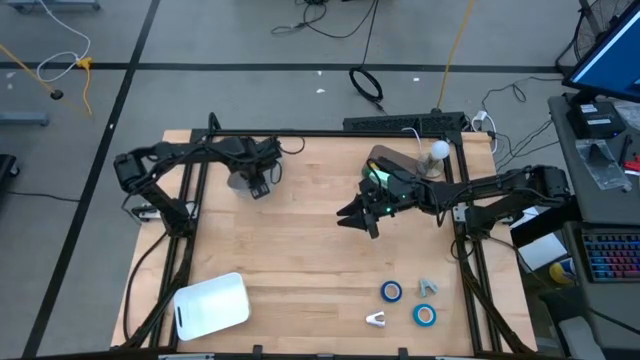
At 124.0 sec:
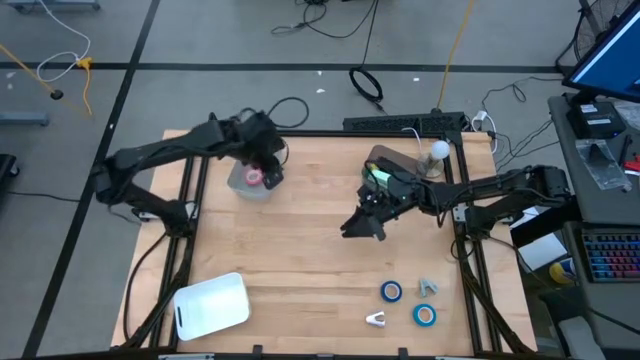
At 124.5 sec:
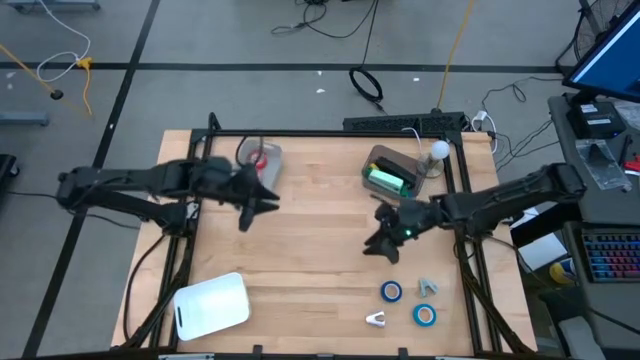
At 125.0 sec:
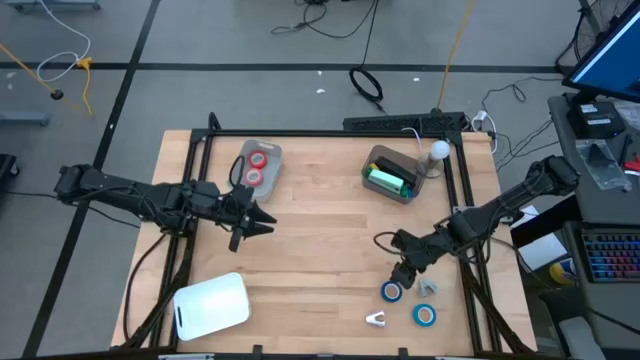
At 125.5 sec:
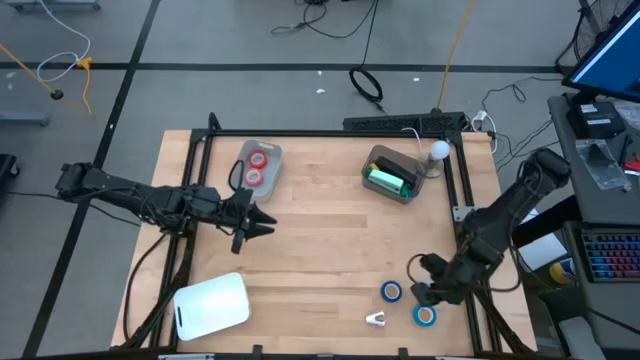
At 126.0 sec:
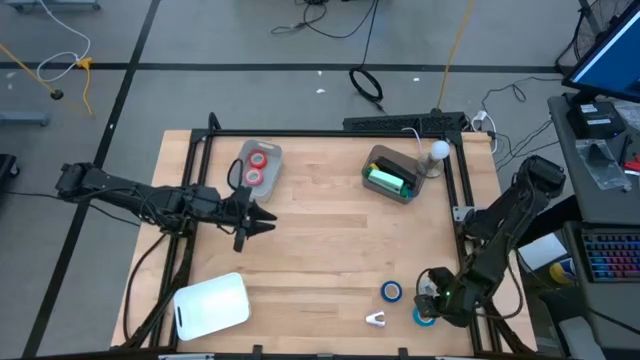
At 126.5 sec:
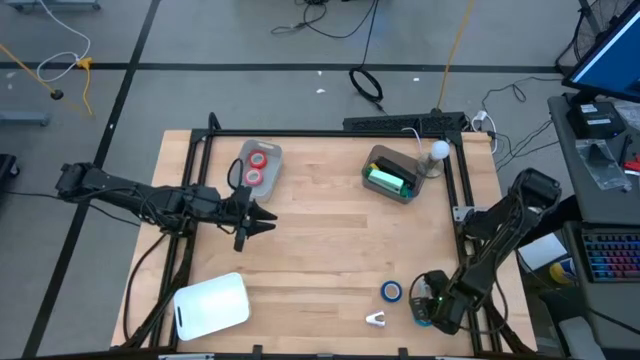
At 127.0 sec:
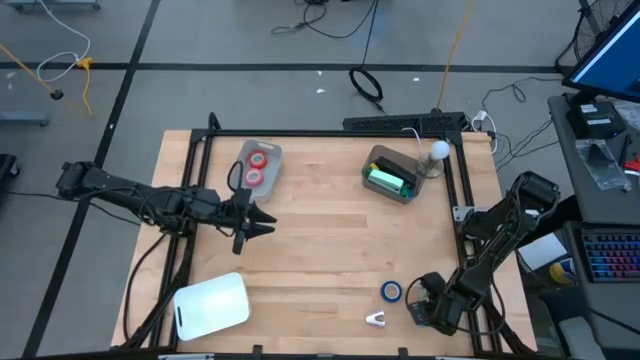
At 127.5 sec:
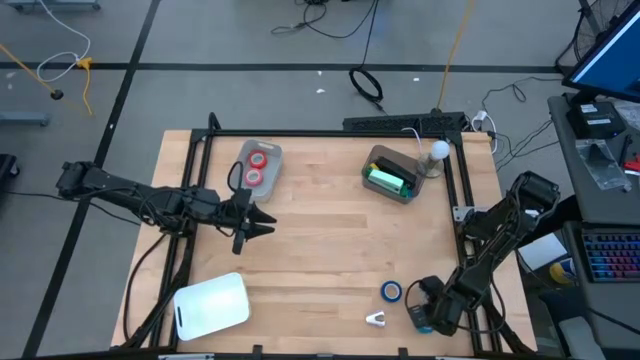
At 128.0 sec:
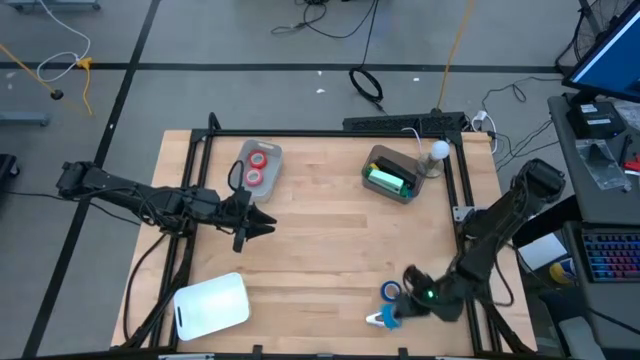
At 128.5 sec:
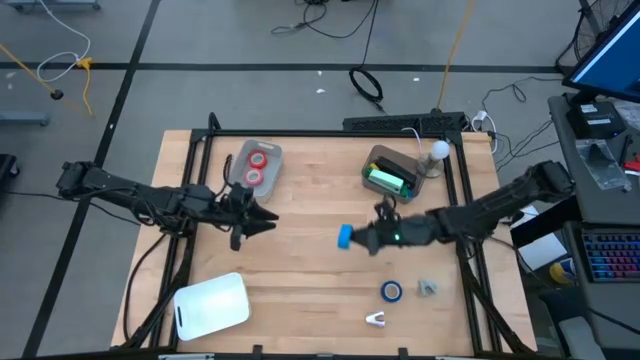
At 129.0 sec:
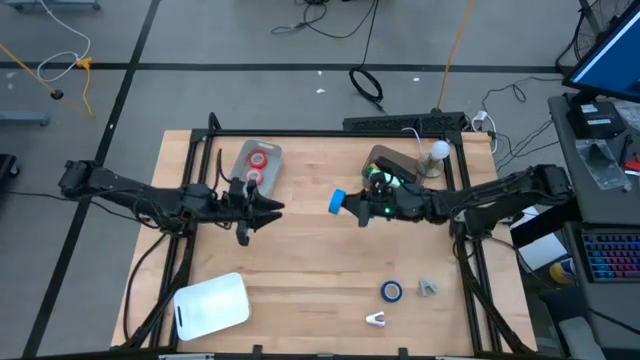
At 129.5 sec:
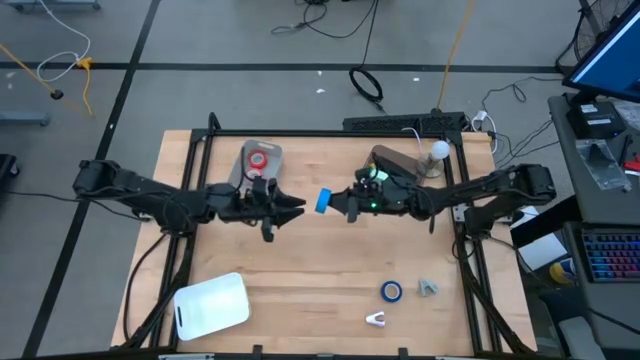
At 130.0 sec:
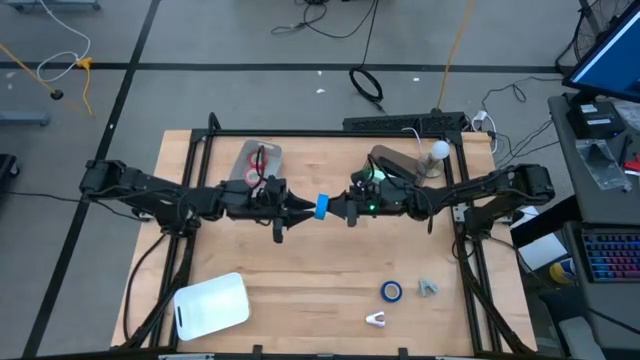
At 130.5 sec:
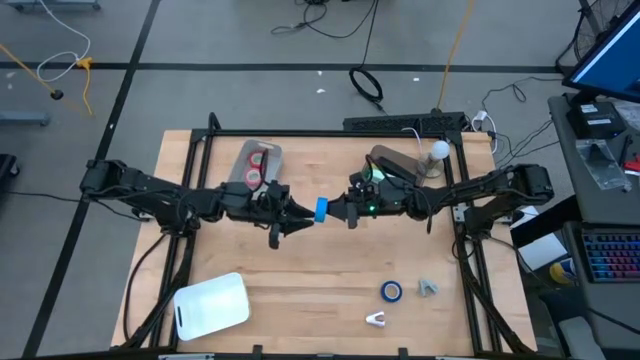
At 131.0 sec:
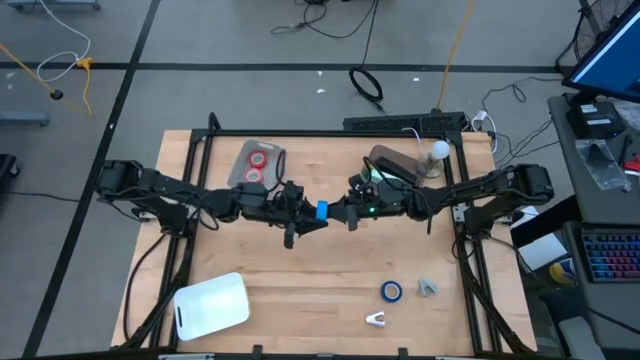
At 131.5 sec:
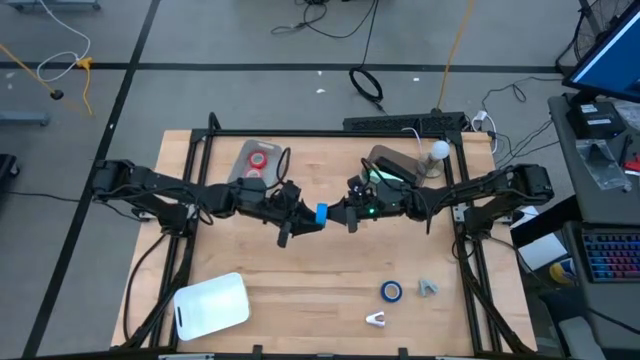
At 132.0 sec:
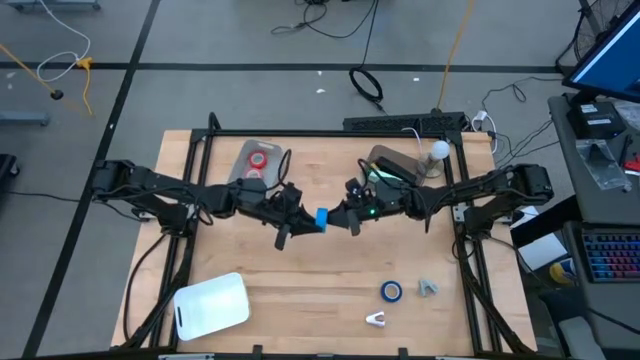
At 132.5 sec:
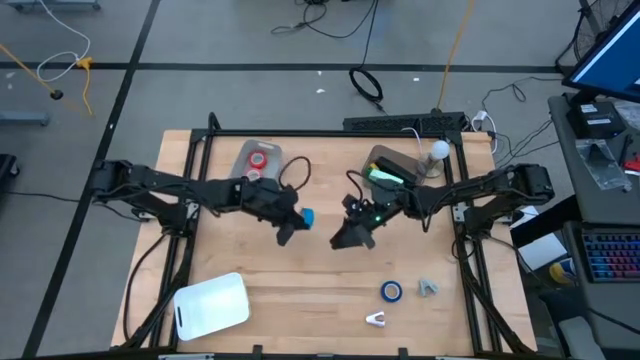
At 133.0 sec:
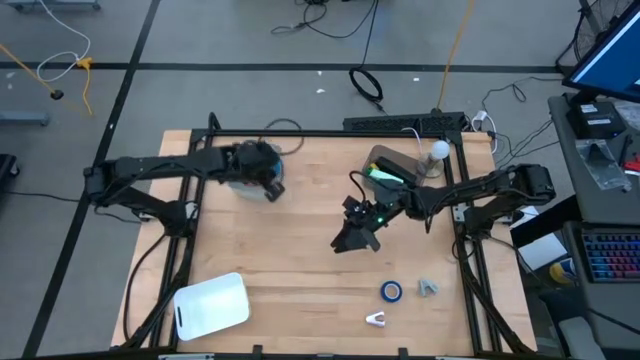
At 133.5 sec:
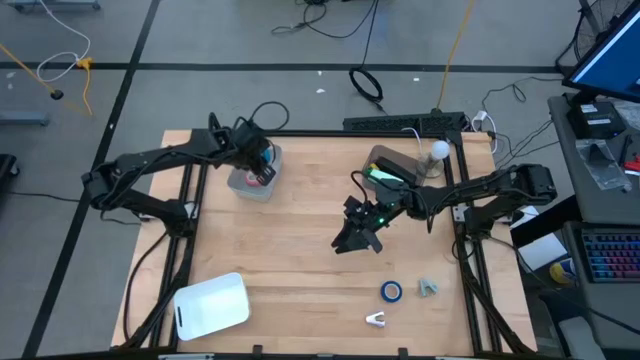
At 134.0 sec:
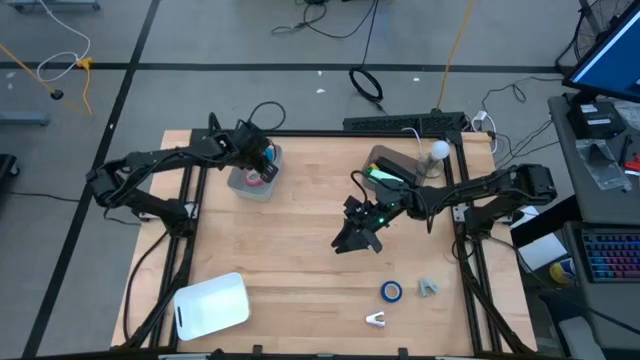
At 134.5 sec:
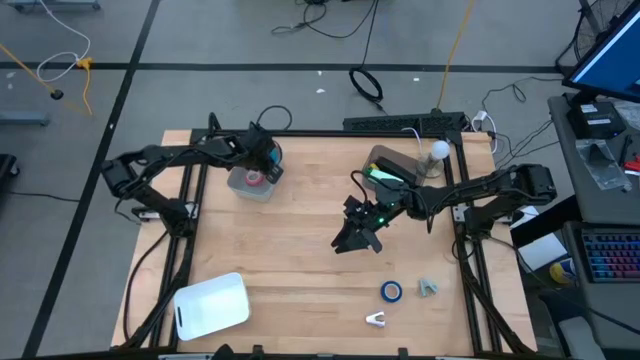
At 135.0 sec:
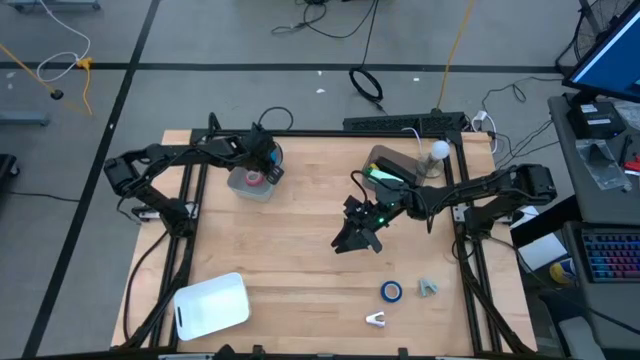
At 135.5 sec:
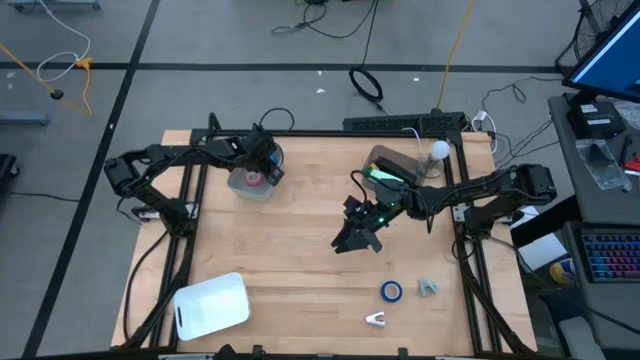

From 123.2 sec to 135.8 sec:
Task: Pick and place Stapler, Stapler remover, tape
Put the light blue tape into the gray bin

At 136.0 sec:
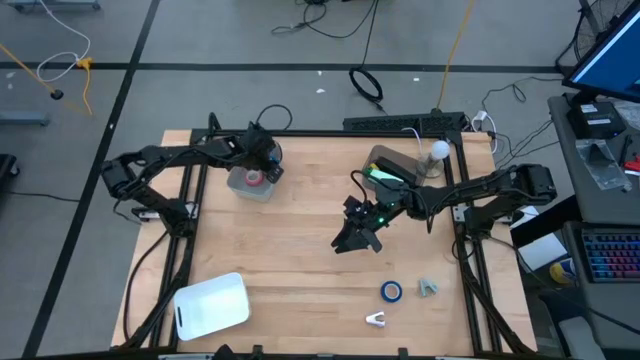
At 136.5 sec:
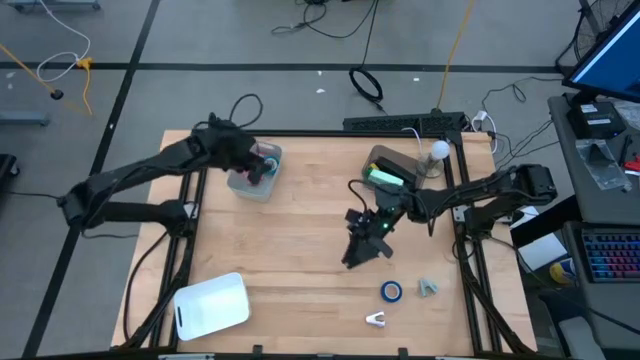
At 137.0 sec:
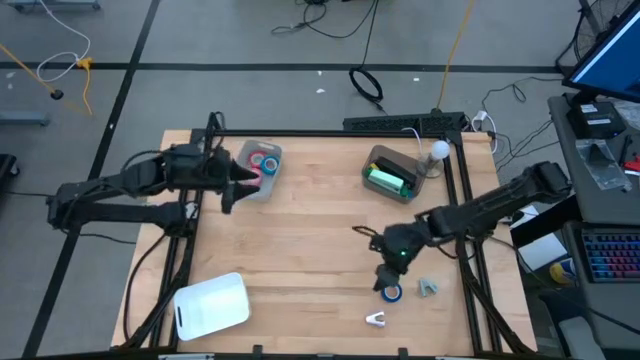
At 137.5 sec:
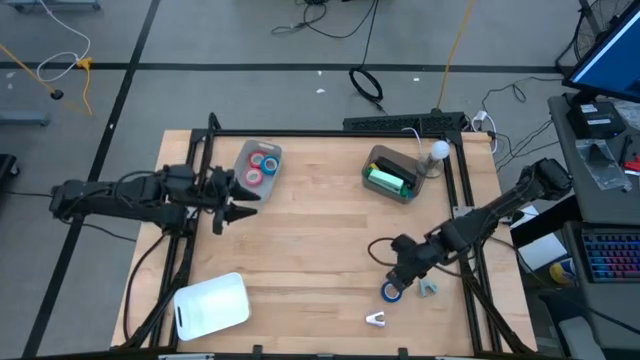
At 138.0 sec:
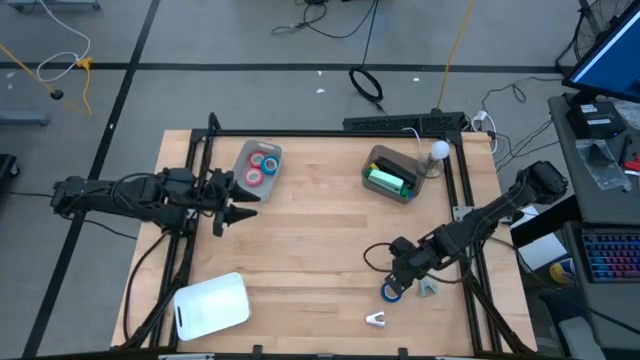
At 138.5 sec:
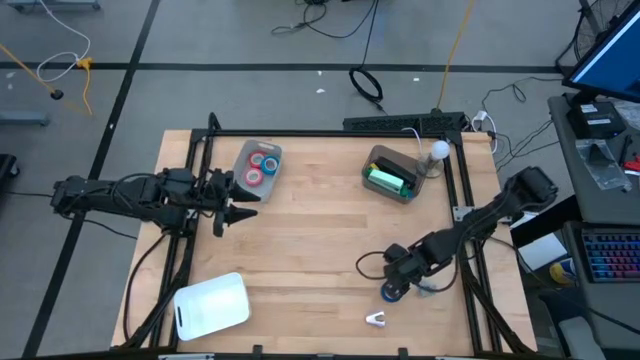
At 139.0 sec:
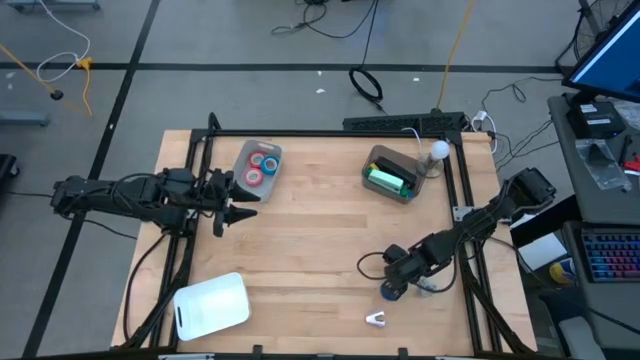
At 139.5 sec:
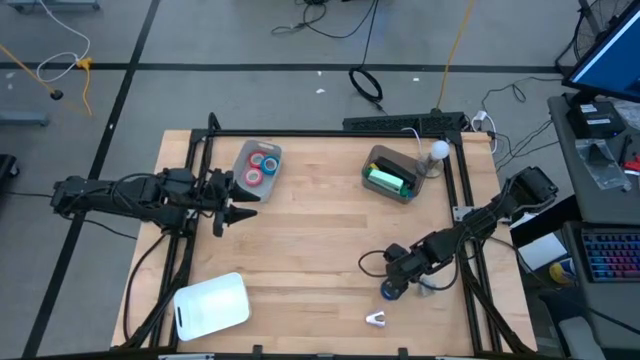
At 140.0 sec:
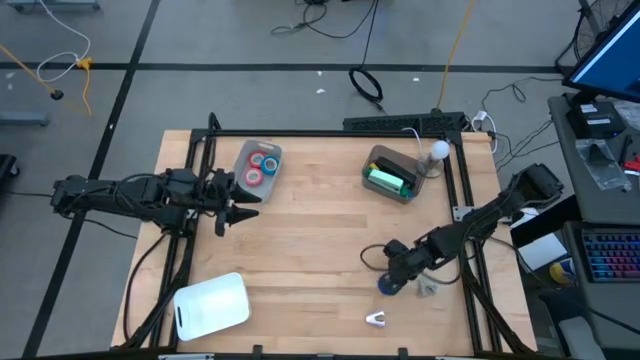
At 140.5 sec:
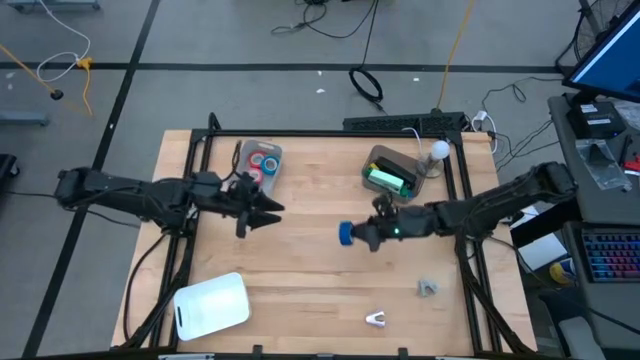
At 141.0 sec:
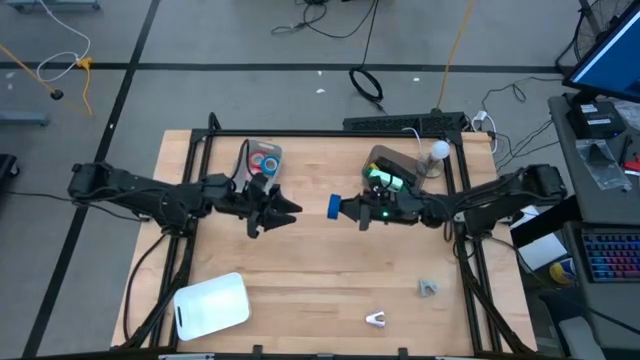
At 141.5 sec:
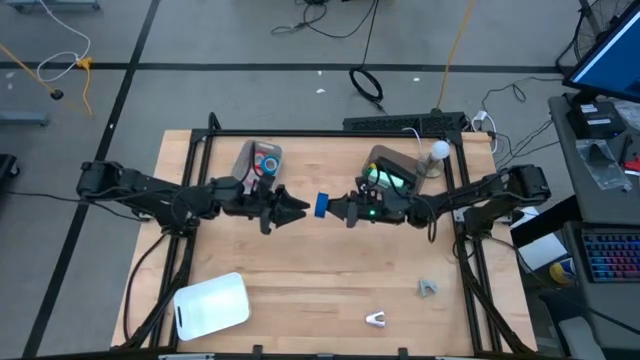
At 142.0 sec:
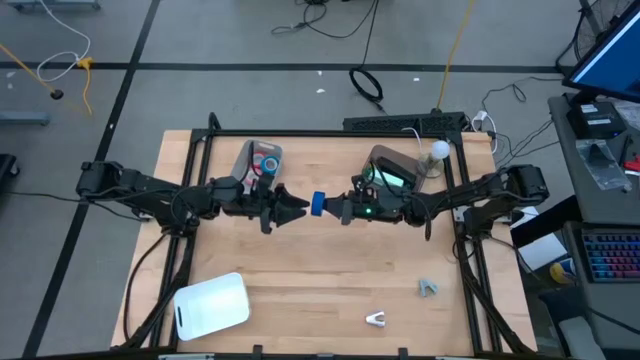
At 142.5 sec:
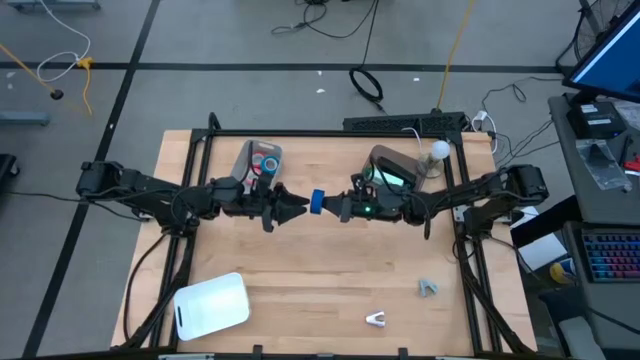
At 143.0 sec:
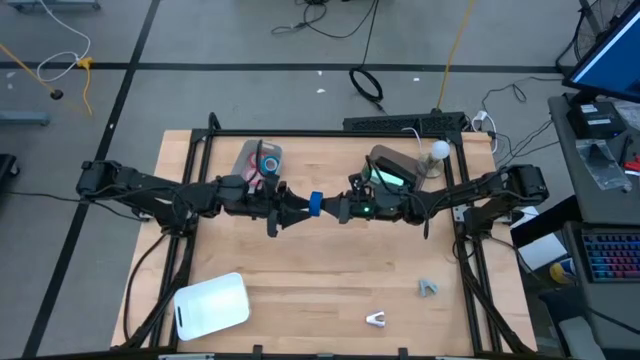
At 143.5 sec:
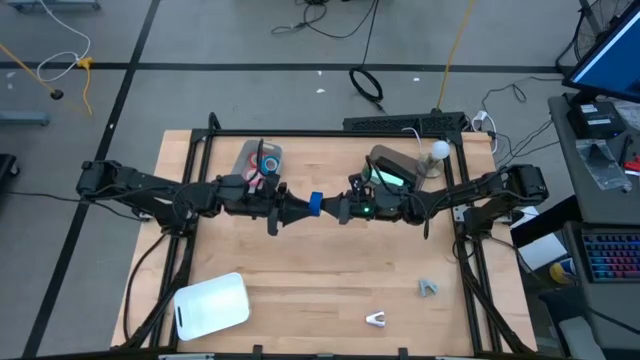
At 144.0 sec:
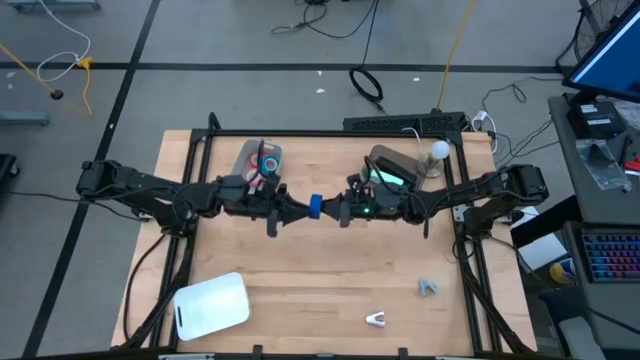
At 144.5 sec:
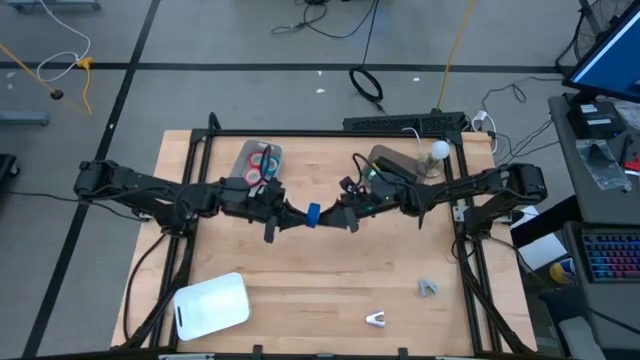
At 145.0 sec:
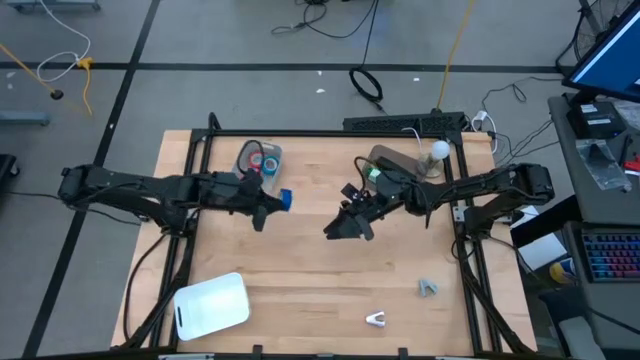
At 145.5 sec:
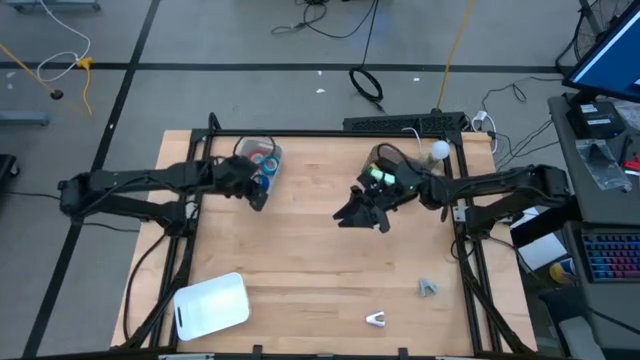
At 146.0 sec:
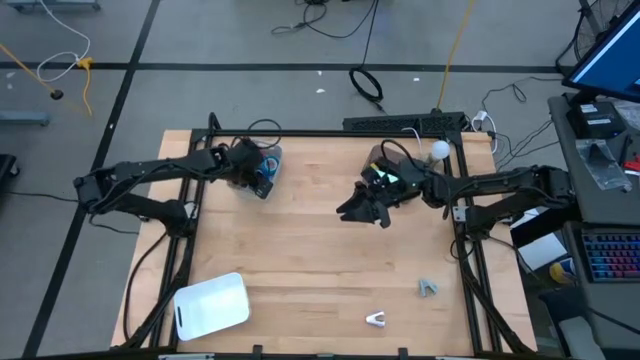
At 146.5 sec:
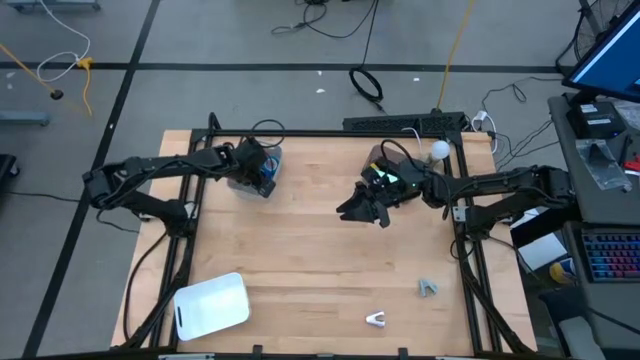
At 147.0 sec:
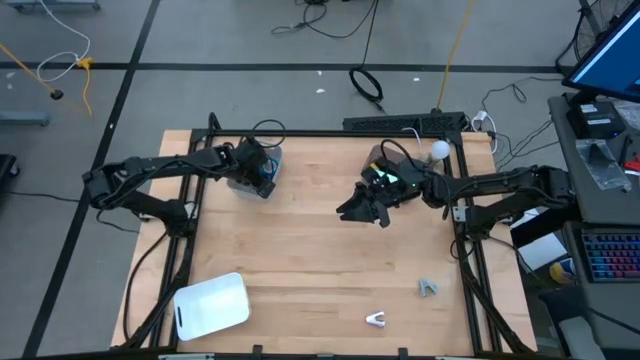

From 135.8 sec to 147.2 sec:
Put the blue tape into the gray bin
